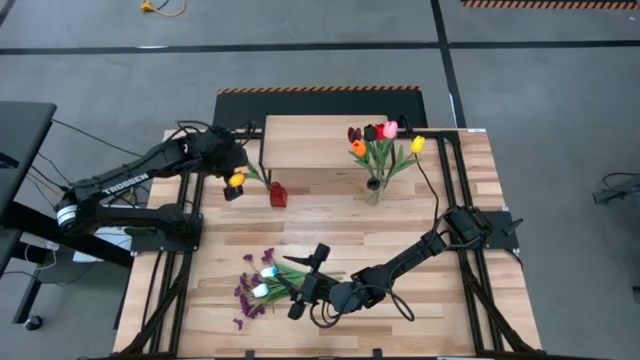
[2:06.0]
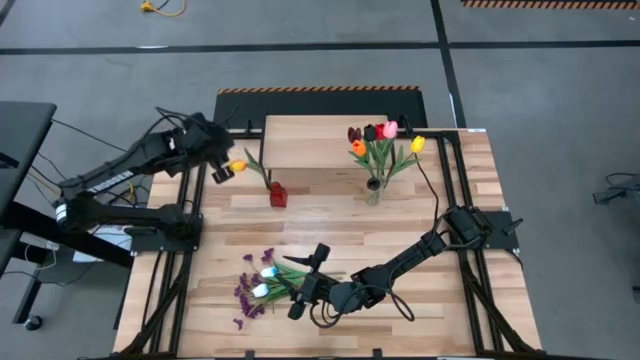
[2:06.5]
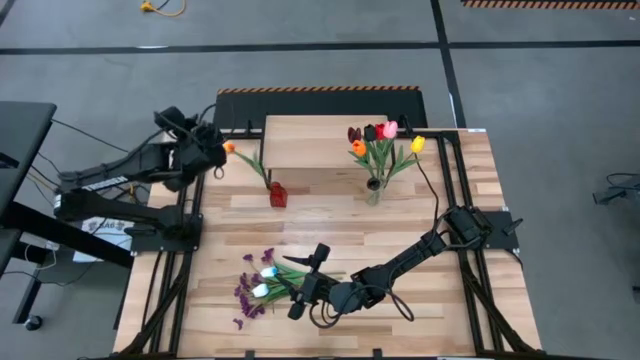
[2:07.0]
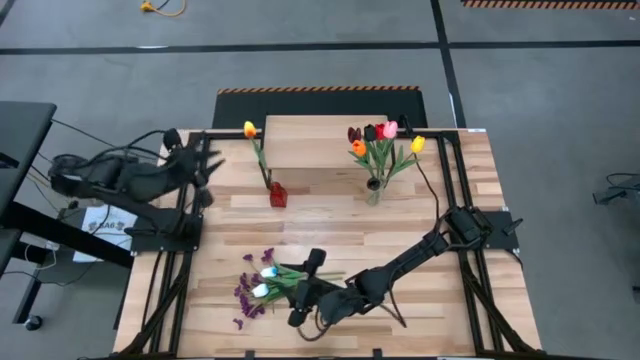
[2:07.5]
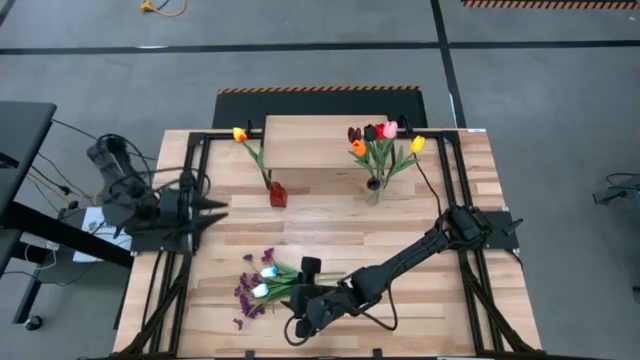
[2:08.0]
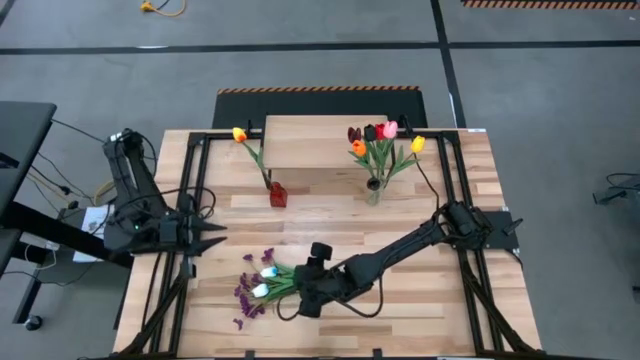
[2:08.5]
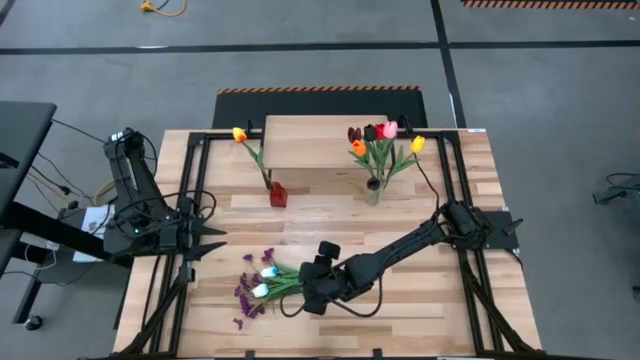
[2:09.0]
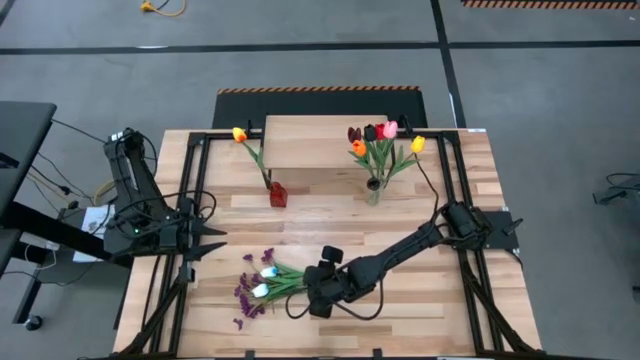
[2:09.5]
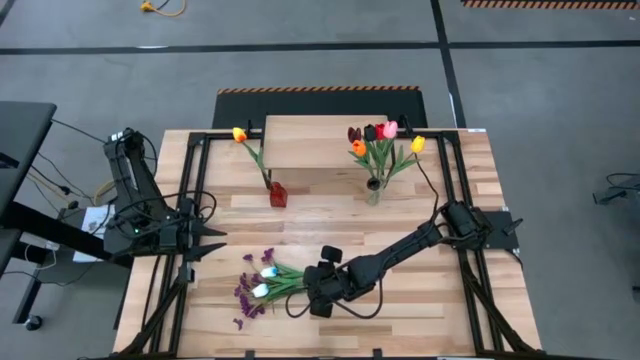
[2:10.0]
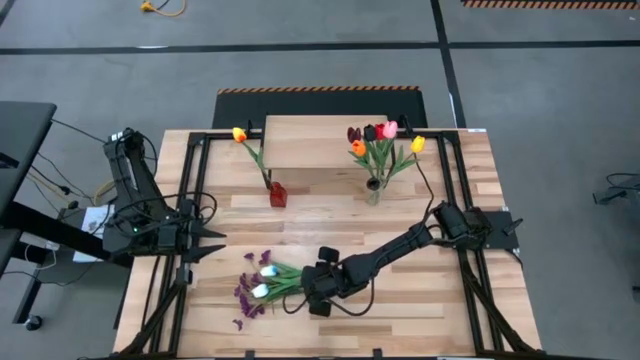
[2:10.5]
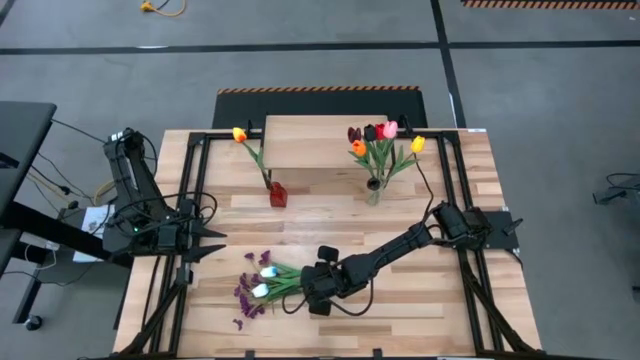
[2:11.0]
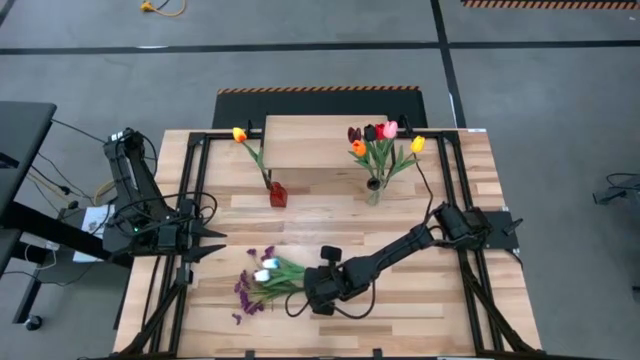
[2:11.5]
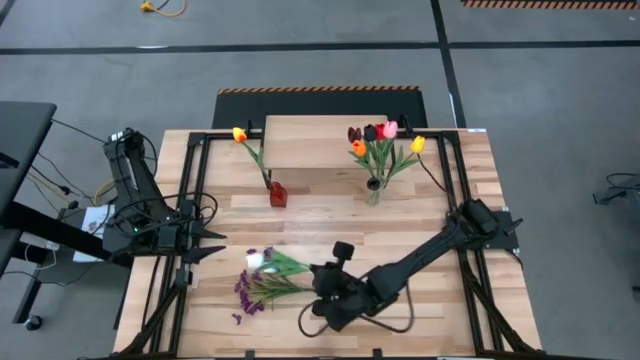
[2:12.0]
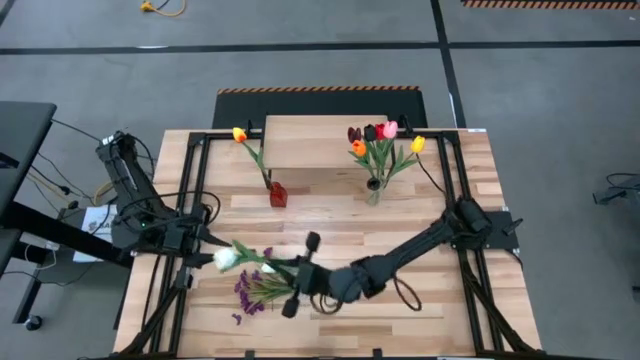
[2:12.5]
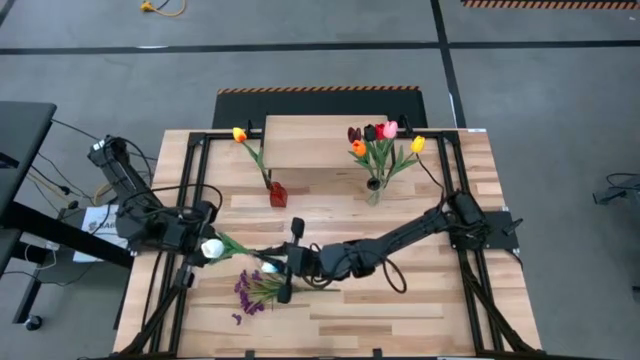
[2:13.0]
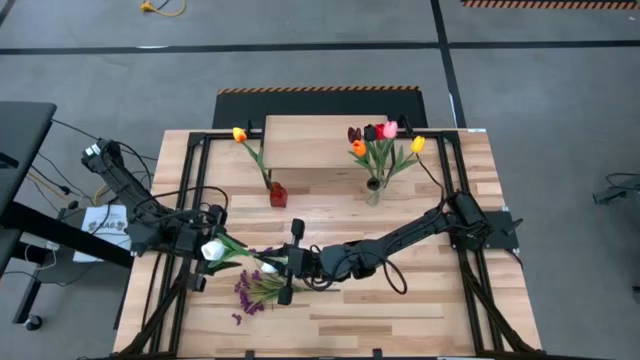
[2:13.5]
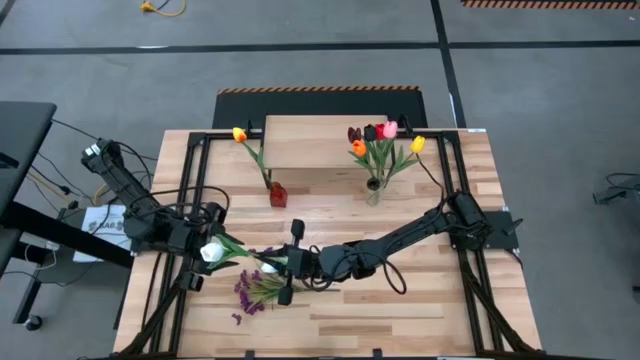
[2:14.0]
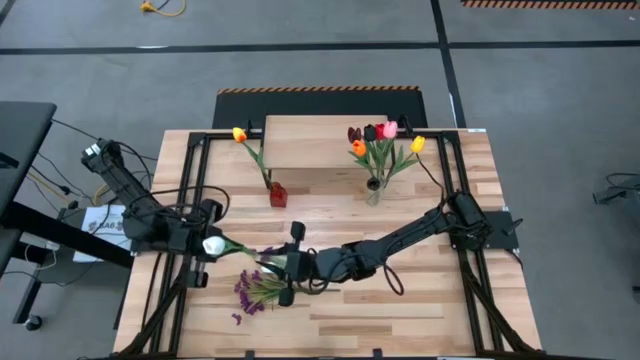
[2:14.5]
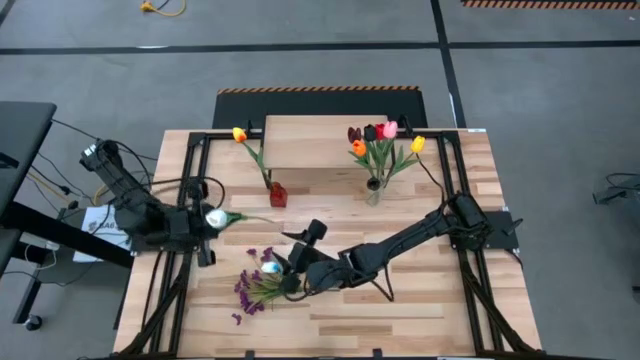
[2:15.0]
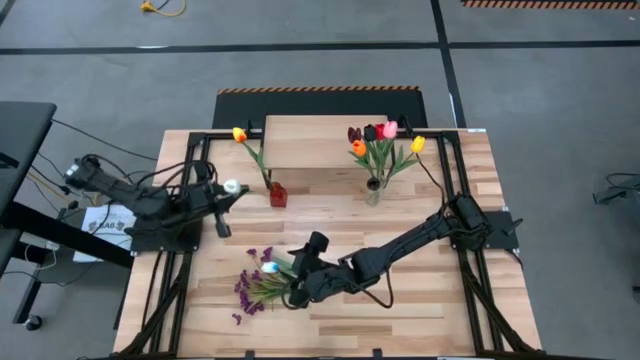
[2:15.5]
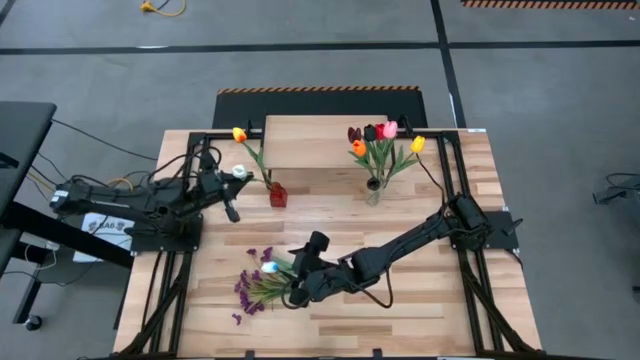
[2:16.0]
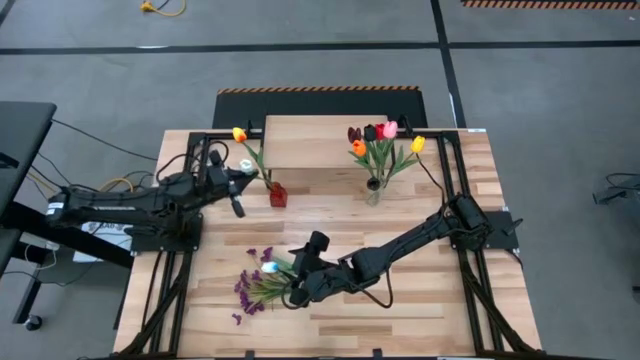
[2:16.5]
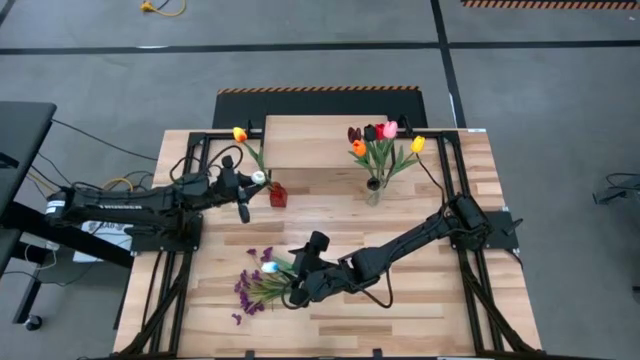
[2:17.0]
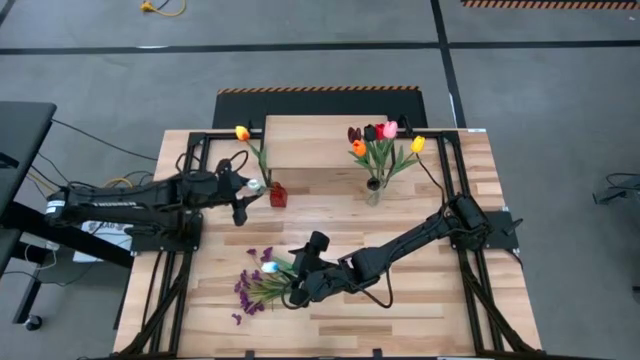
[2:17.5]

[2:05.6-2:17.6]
Task: Pick and place flowers into a vace then onto a shelf
Put the white flower into the red vase

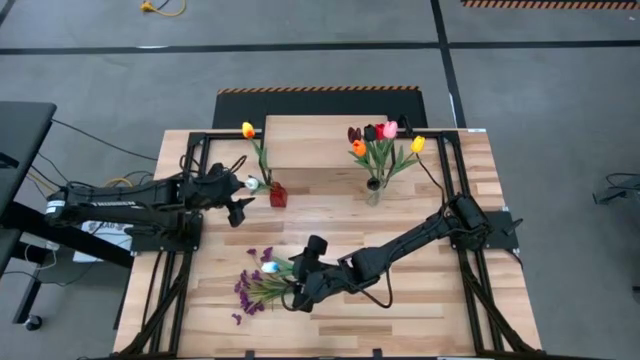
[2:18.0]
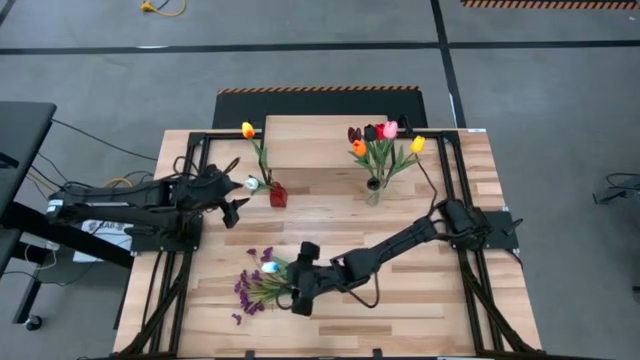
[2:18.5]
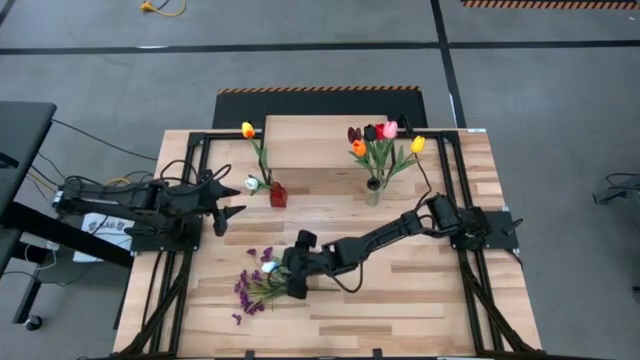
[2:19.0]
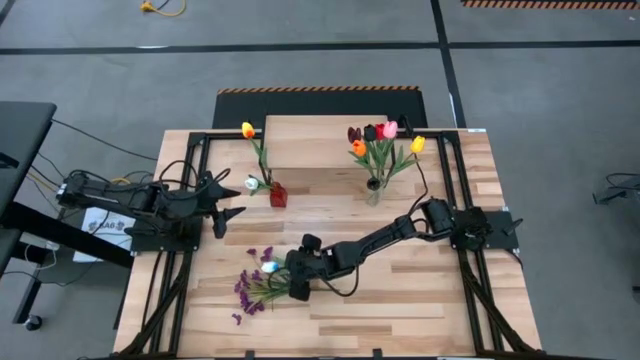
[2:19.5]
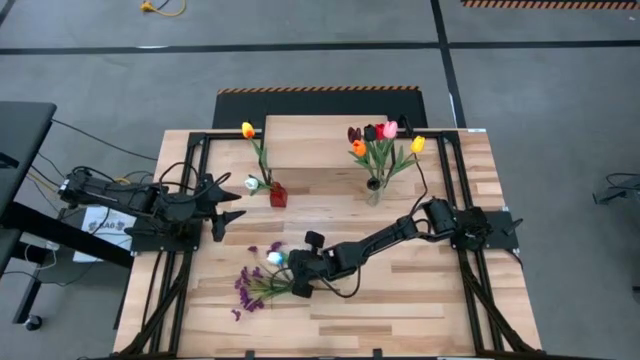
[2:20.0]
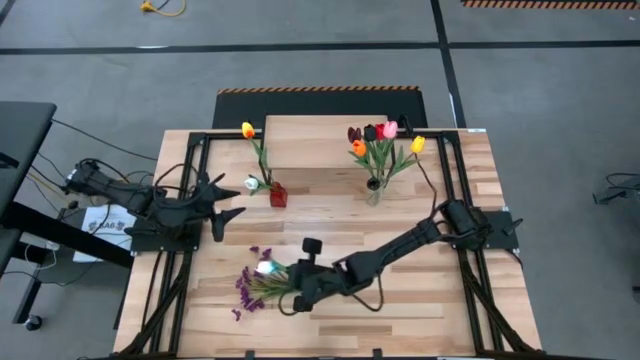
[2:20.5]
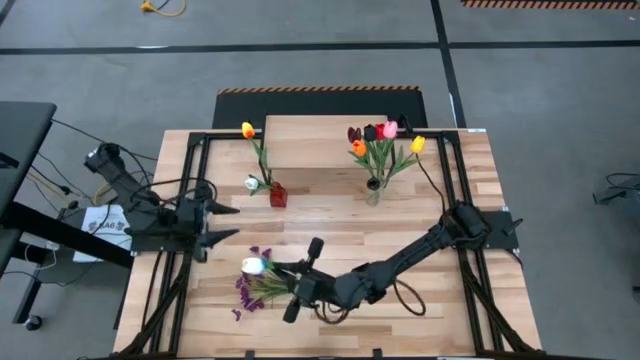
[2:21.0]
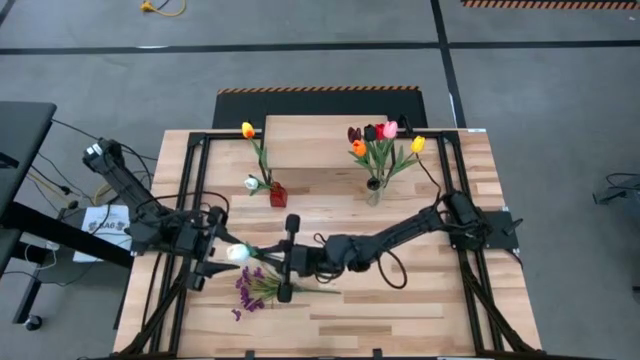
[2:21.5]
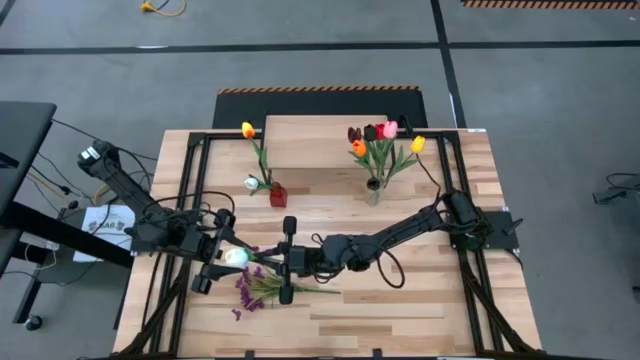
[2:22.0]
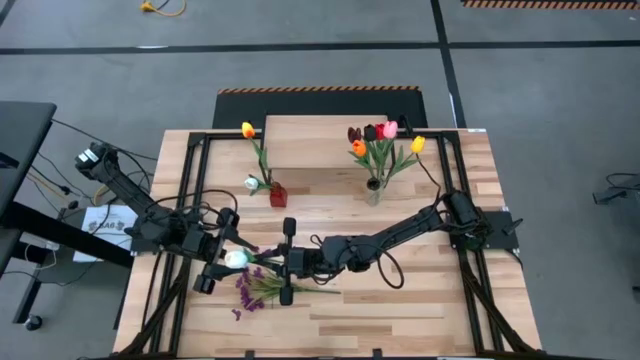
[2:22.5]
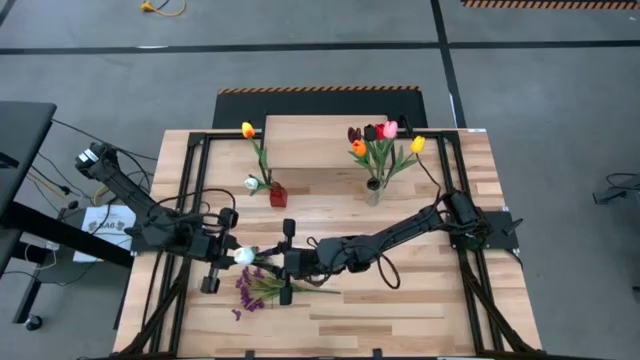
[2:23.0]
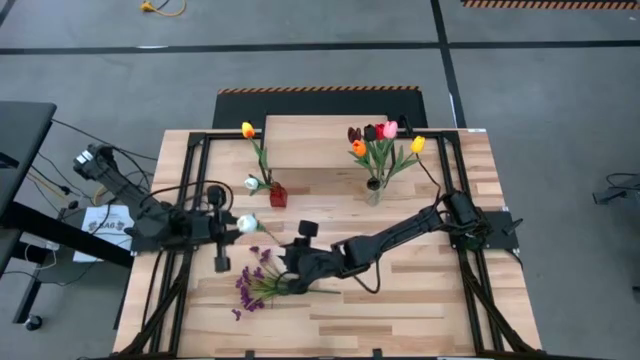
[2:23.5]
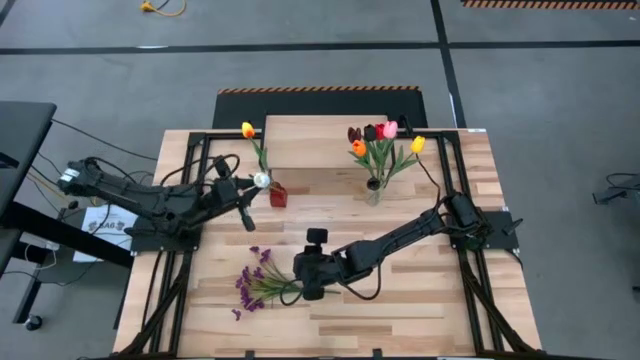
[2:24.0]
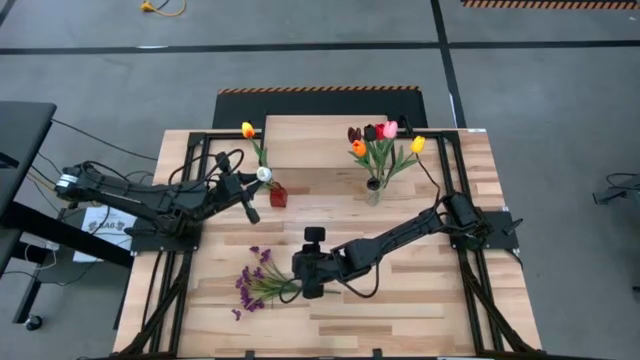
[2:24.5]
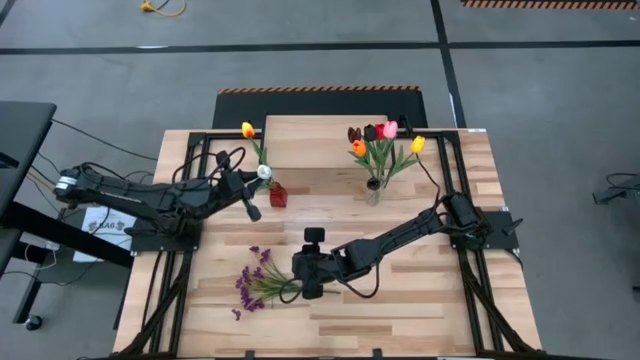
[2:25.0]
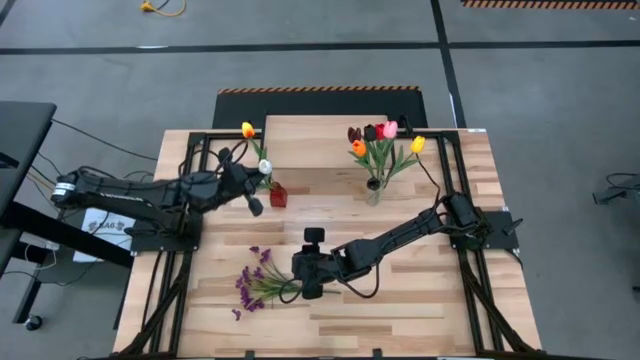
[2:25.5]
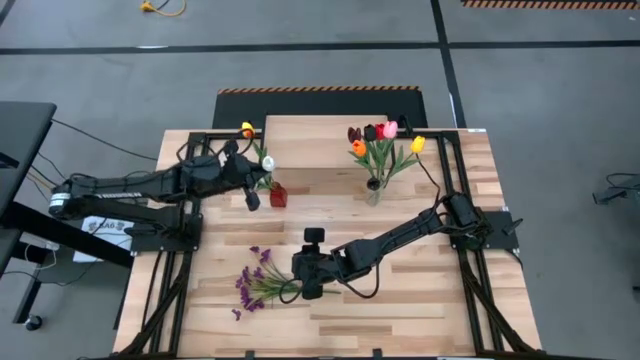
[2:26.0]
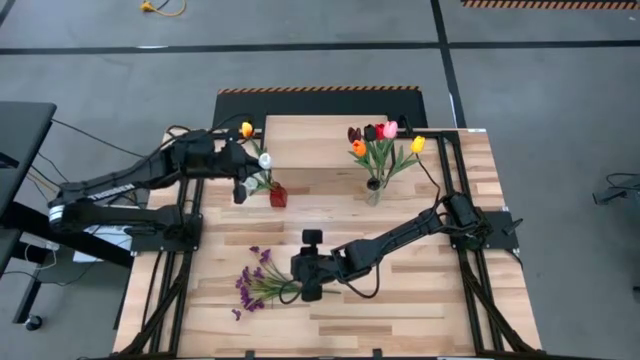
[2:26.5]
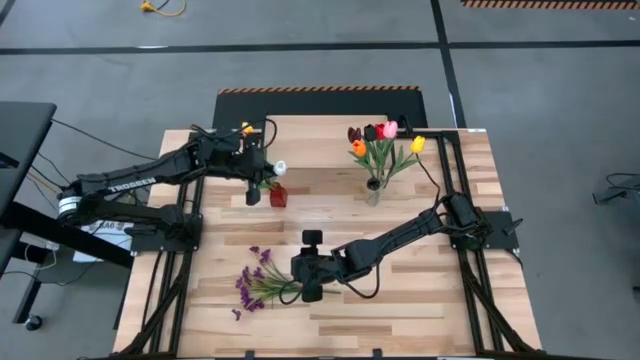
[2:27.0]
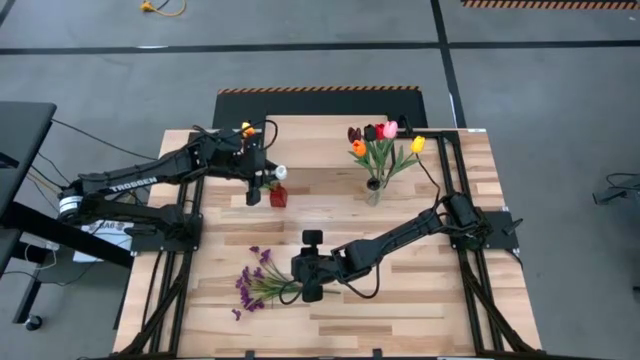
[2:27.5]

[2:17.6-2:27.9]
Put the white flower into the red vase
